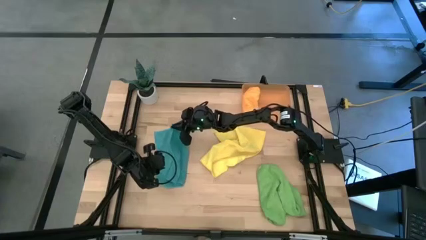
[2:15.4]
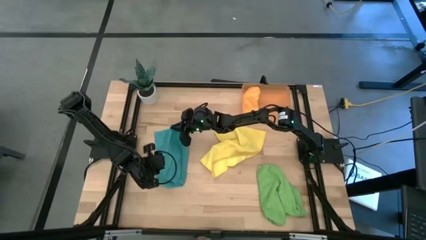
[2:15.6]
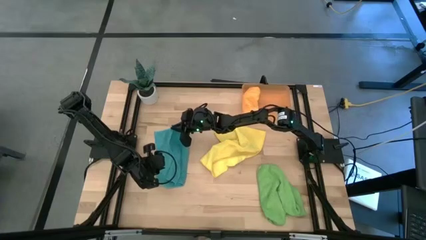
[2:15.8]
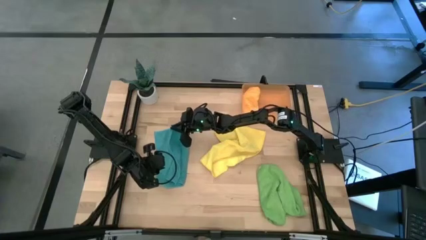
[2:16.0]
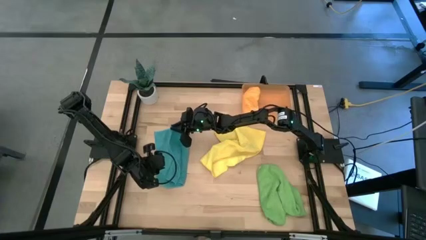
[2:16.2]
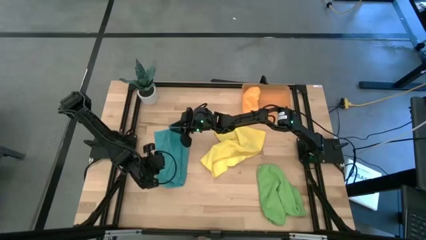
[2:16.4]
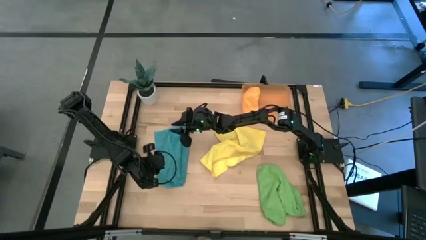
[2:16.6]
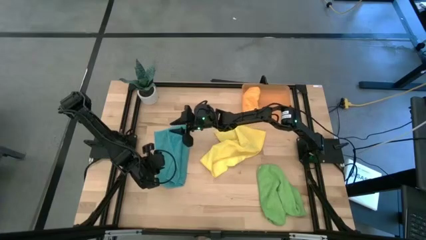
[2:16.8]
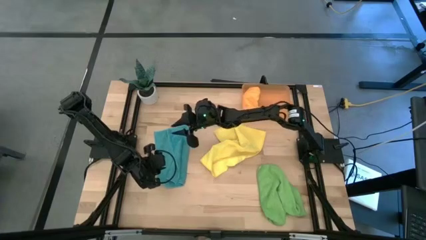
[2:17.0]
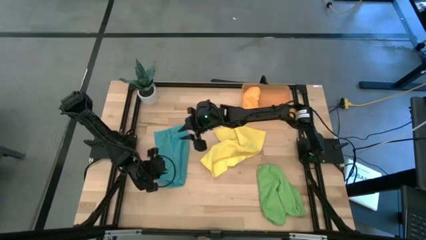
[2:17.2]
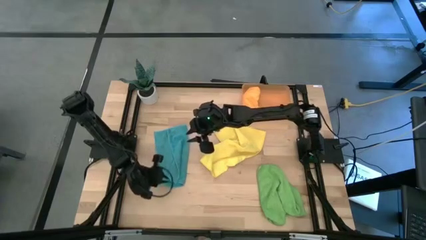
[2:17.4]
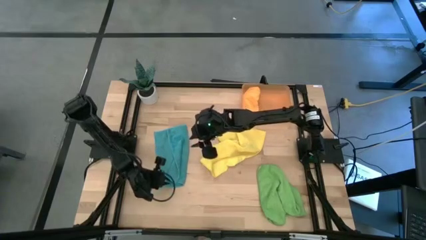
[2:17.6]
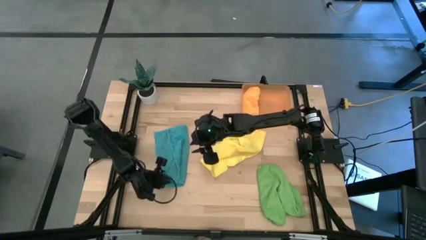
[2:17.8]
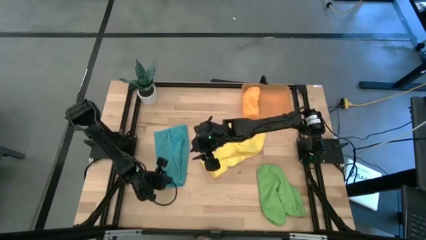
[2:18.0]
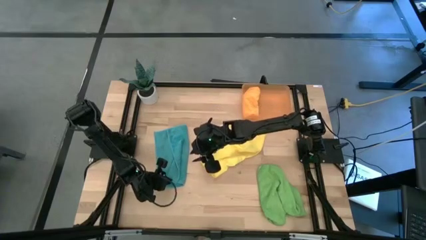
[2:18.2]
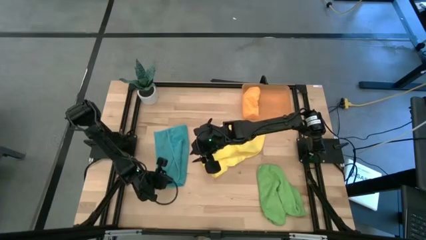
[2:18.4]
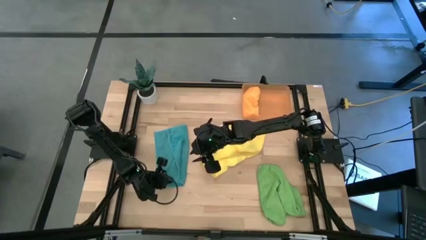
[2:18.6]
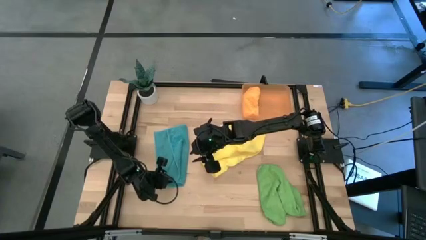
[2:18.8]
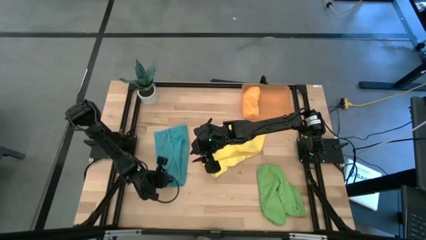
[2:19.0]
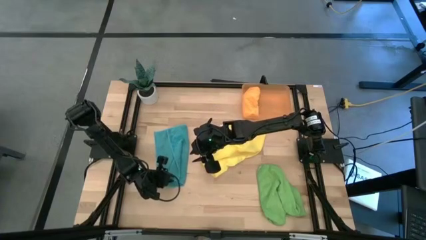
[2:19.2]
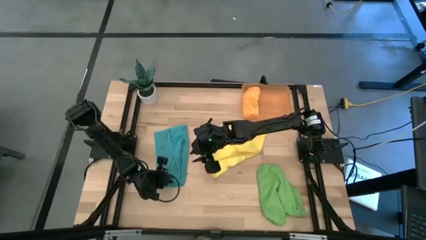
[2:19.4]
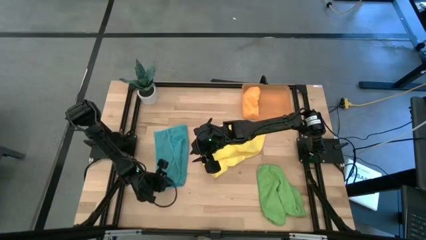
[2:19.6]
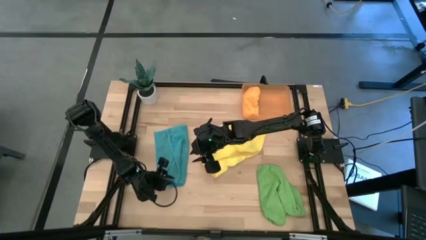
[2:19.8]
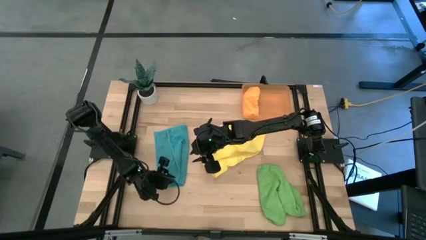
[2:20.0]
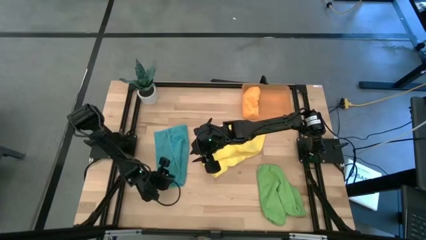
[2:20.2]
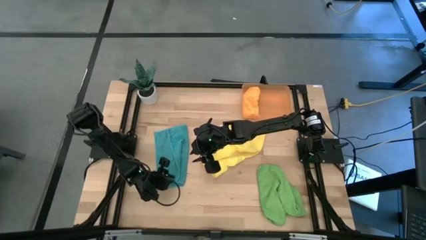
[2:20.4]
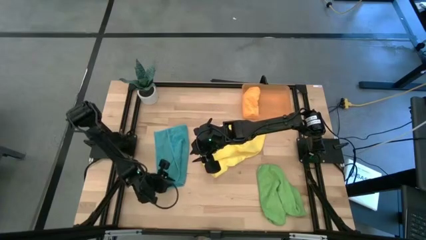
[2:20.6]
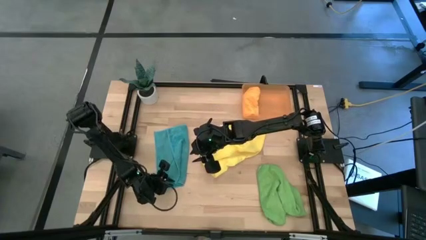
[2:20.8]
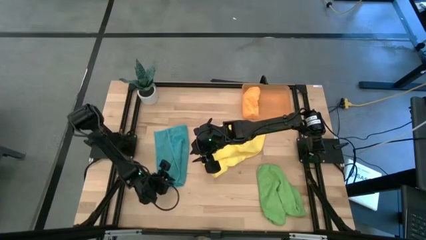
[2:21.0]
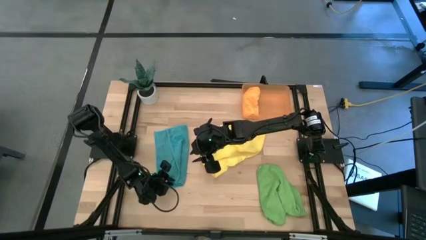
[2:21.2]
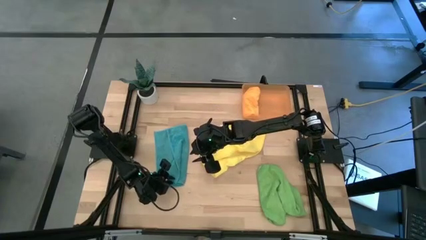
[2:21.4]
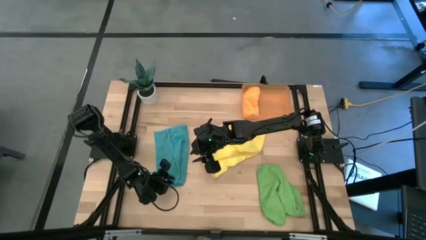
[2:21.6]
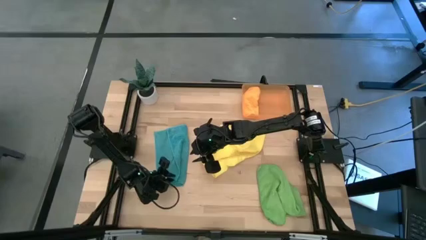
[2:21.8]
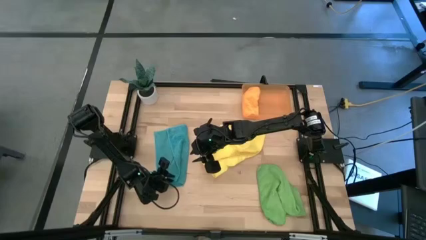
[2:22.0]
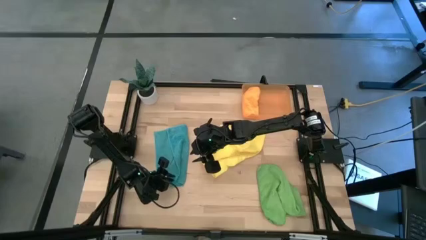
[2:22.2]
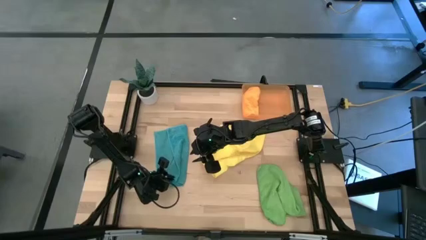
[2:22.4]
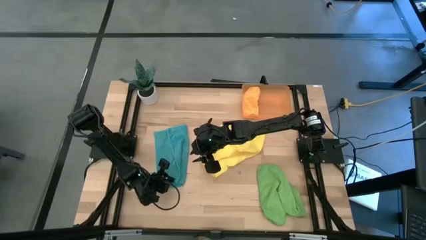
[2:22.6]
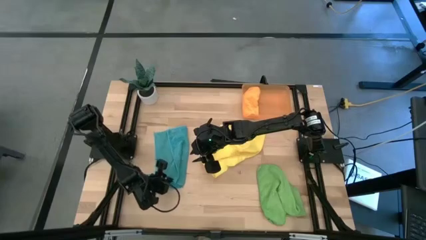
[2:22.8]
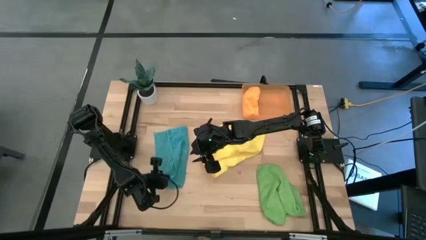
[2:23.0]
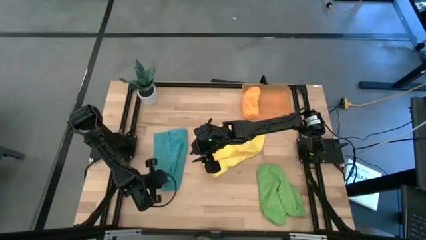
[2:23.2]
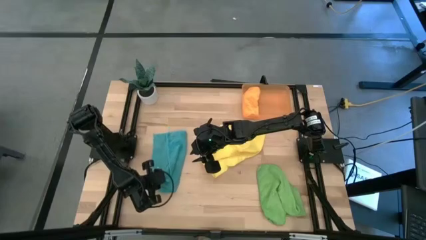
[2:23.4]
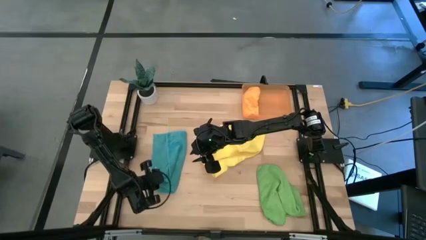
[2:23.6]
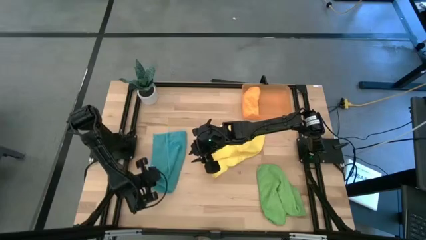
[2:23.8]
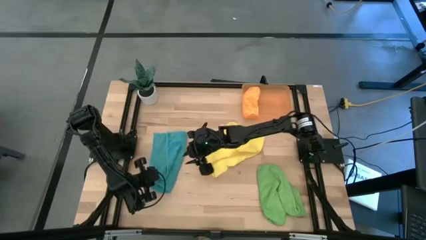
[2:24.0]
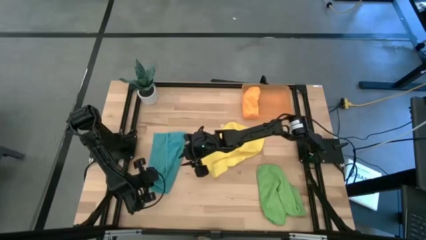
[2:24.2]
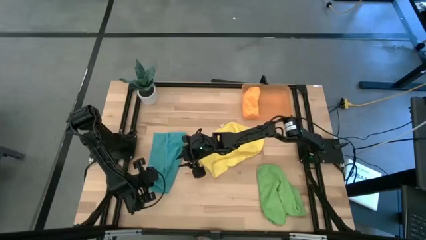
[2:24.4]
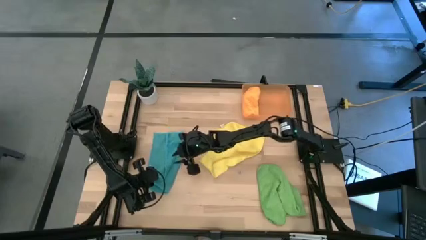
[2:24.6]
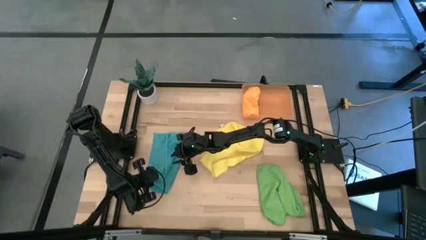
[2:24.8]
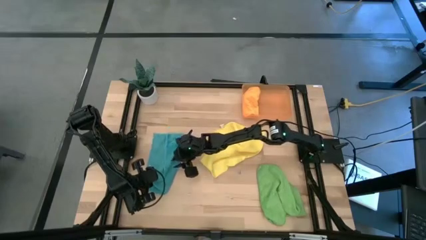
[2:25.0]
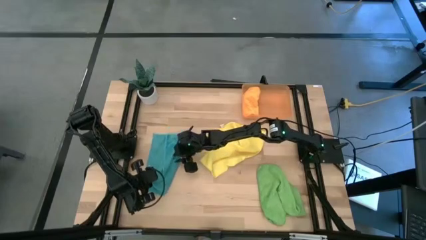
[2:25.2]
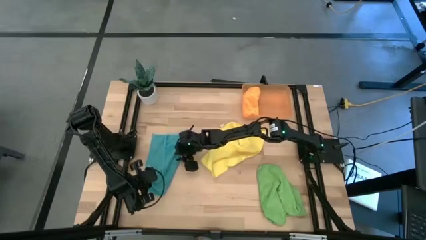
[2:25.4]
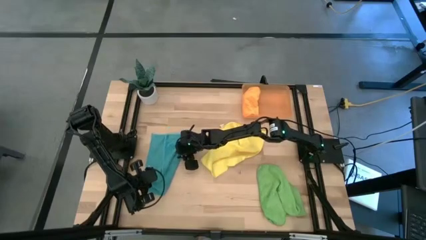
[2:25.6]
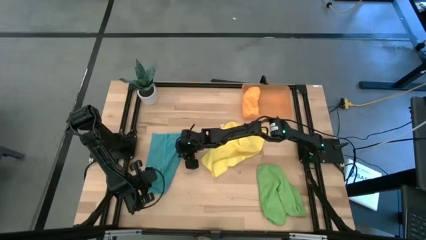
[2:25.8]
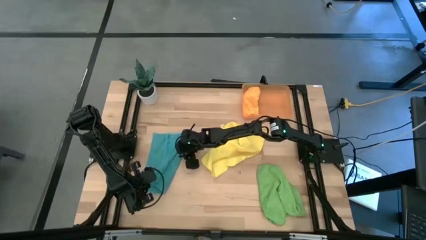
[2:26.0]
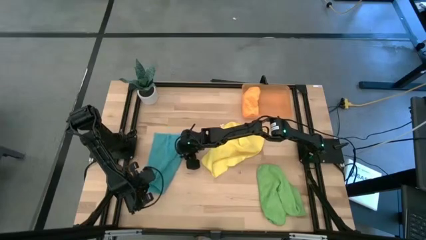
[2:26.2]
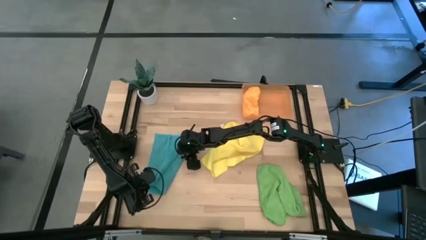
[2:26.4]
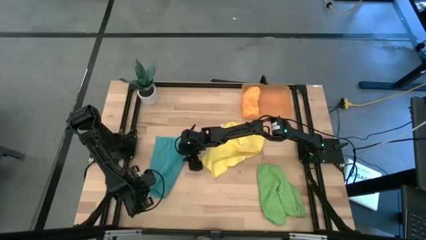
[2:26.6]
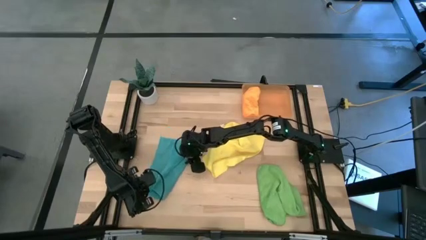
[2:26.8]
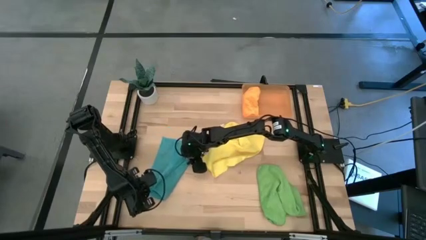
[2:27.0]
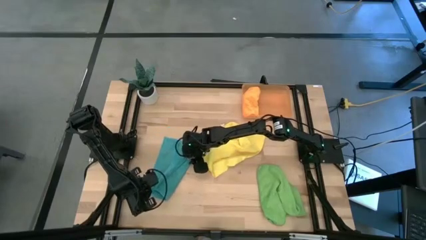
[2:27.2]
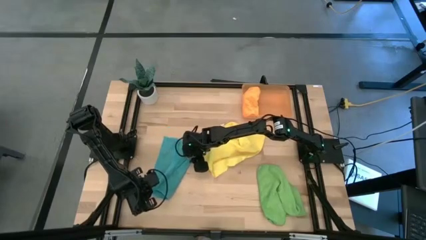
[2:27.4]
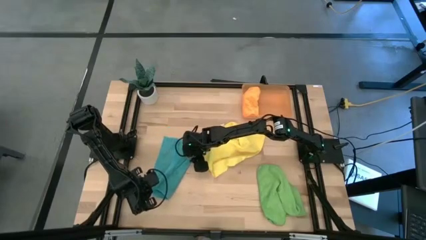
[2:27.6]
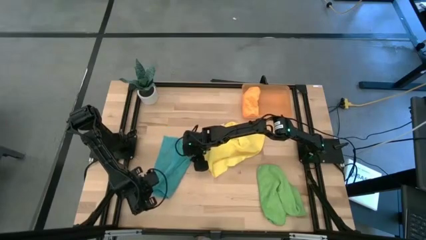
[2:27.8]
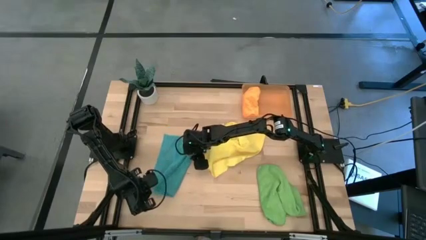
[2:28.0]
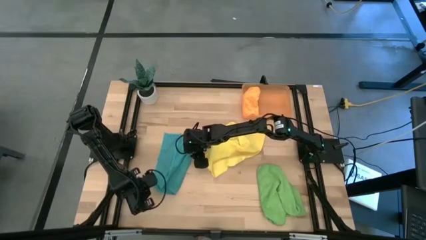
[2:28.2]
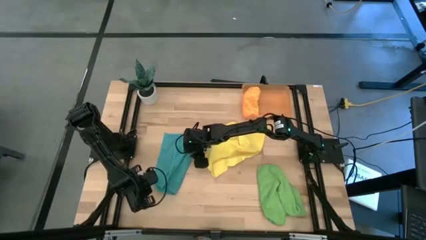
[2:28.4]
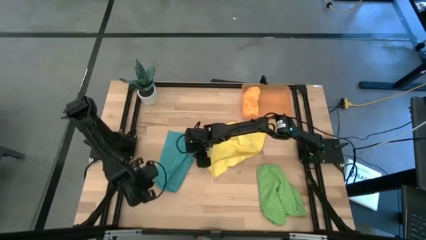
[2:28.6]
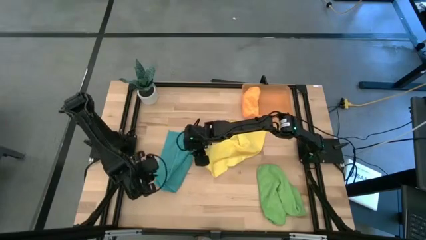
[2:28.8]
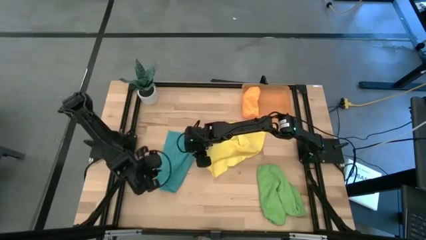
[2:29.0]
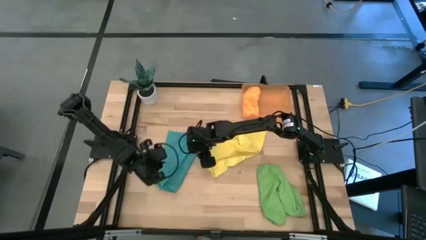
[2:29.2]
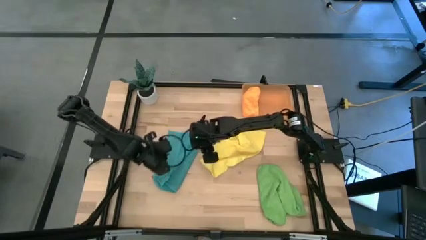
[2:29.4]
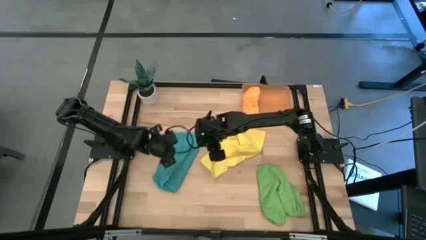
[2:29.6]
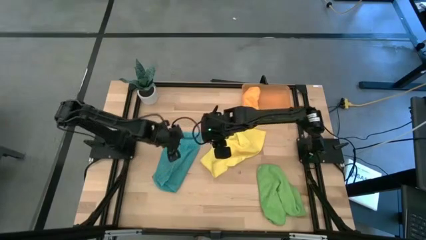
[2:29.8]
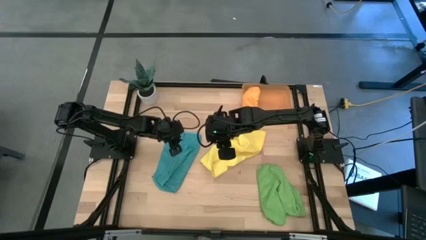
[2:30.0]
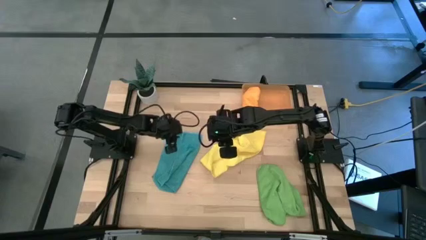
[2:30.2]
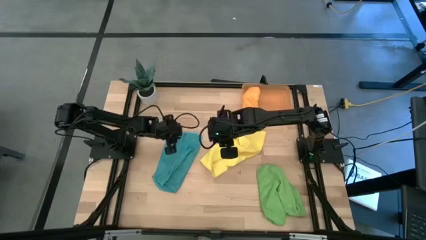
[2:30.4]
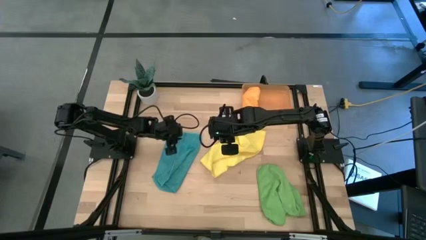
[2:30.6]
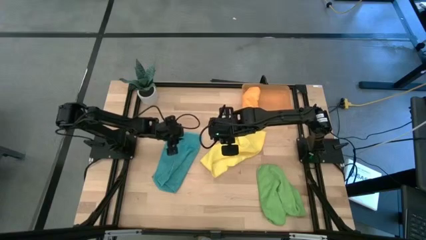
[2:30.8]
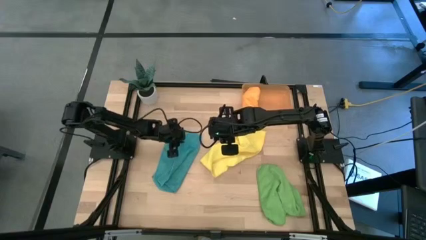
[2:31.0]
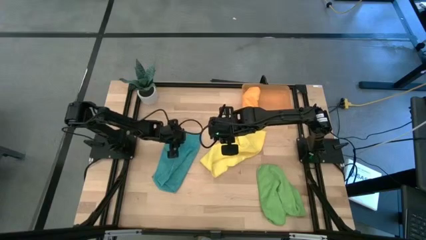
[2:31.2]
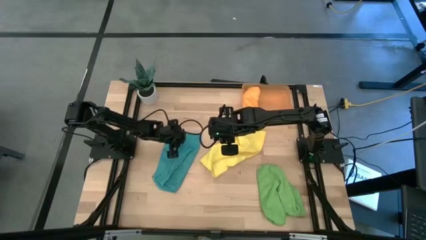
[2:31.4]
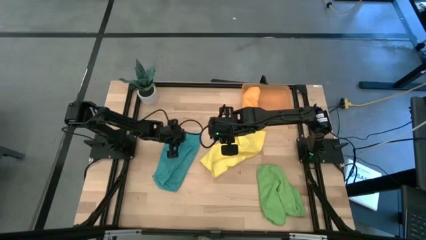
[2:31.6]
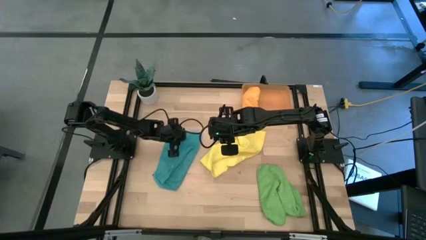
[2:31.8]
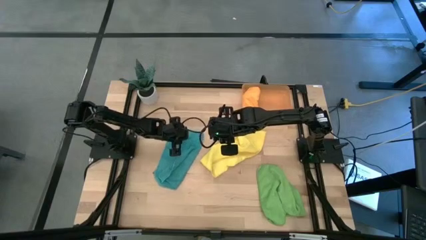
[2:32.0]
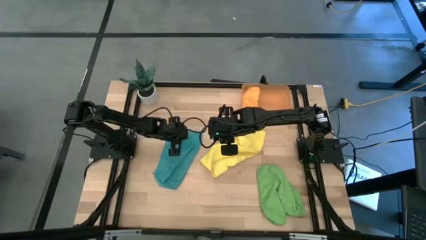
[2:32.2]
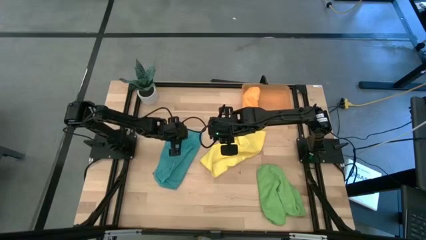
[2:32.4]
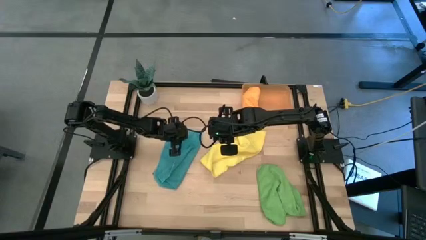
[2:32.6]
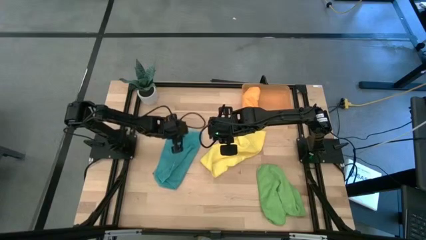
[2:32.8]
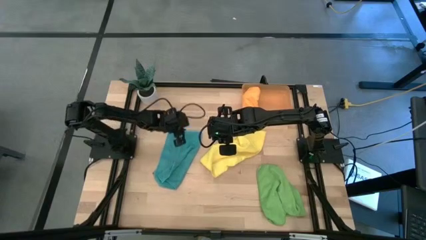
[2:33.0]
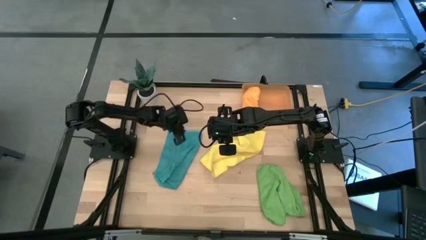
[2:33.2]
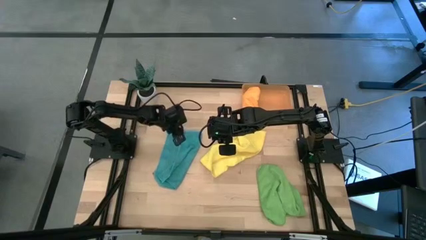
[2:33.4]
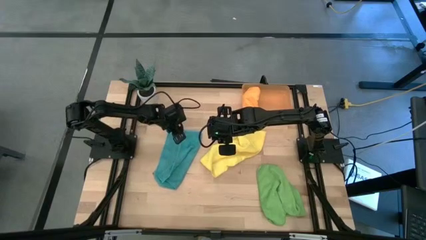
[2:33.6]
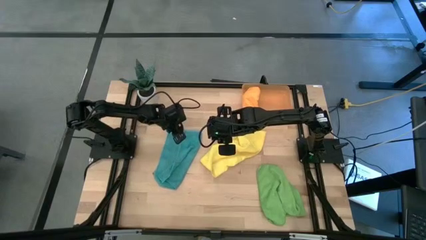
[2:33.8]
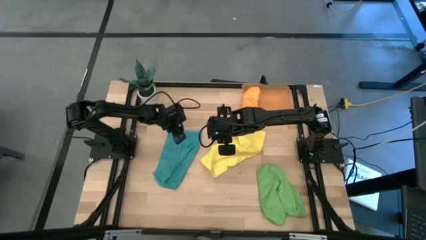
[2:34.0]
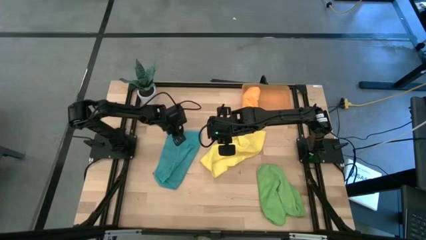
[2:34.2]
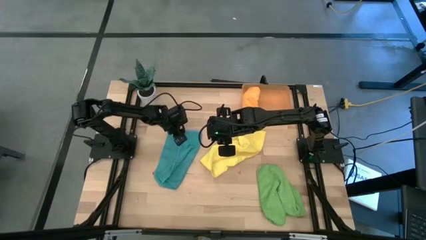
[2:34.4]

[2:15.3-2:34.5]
Task: Roll microfiber towels into tight, uniform cylinder then place into a basket
Roll the blue microfiber towel
